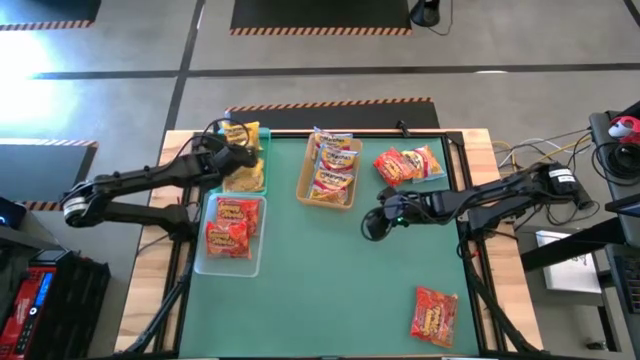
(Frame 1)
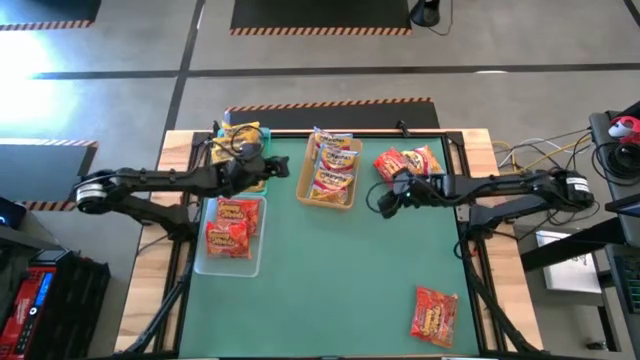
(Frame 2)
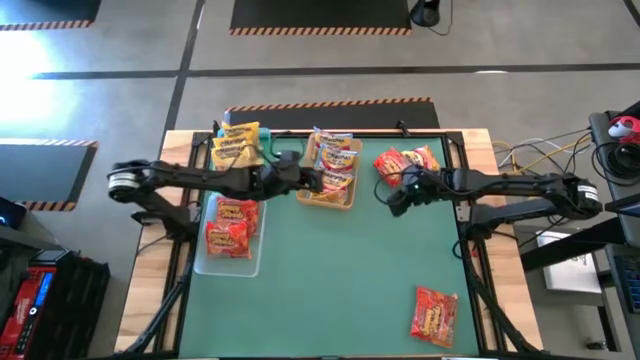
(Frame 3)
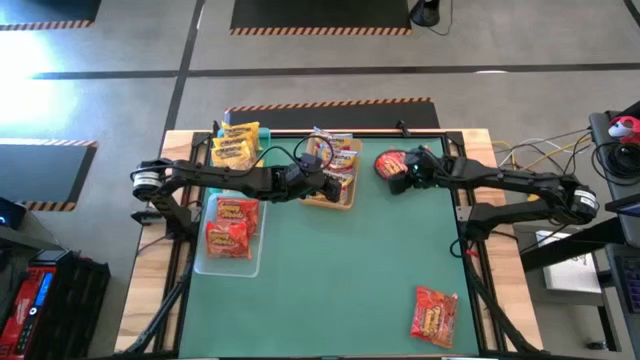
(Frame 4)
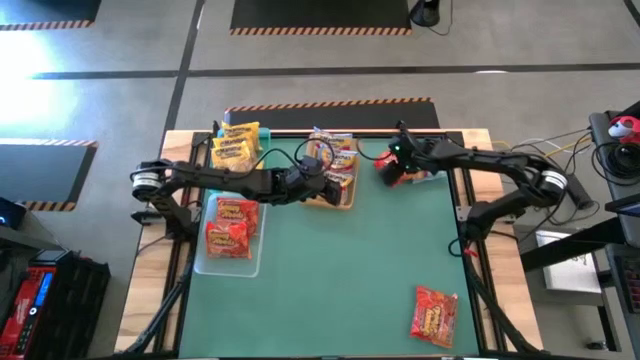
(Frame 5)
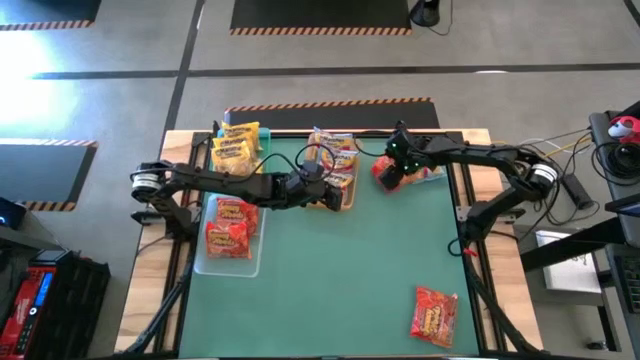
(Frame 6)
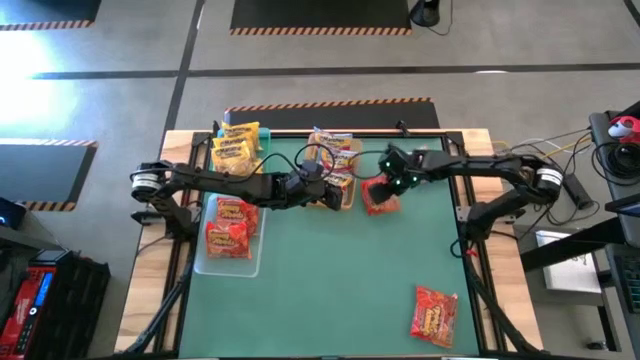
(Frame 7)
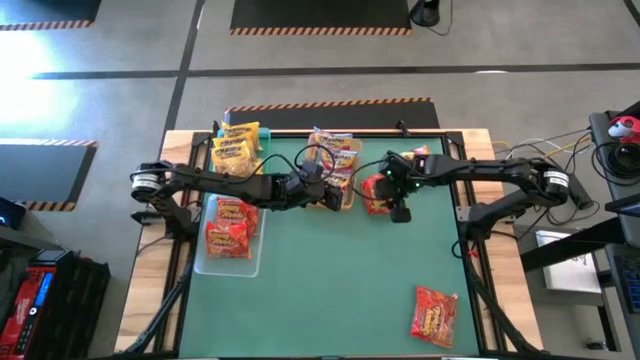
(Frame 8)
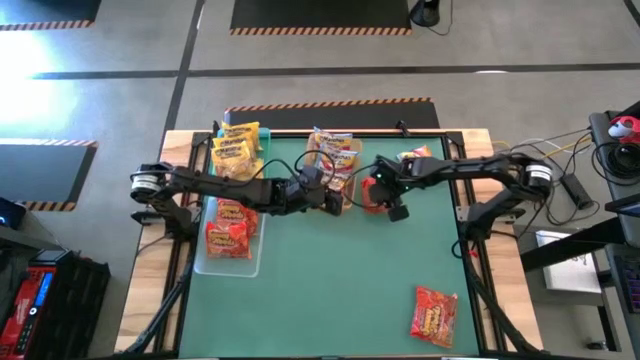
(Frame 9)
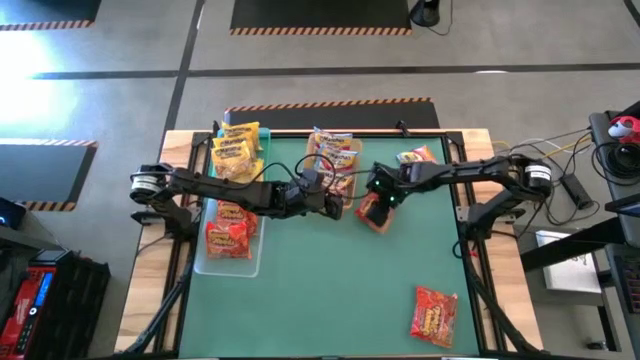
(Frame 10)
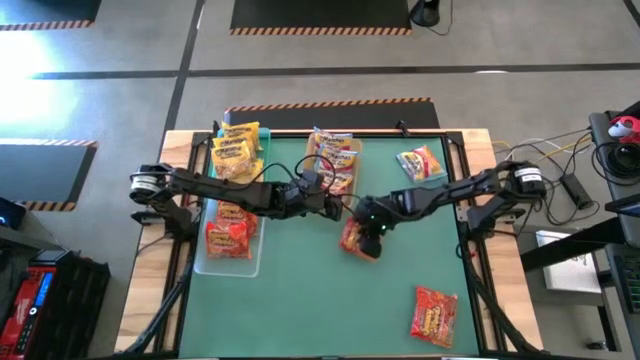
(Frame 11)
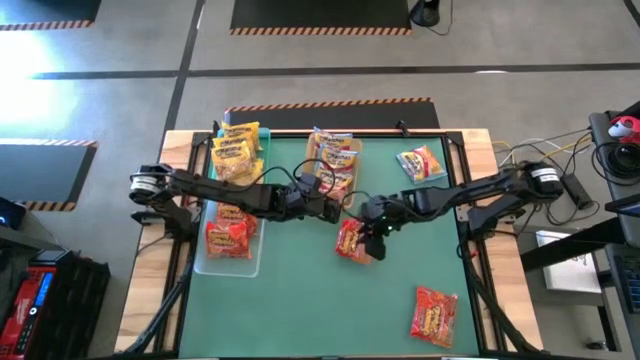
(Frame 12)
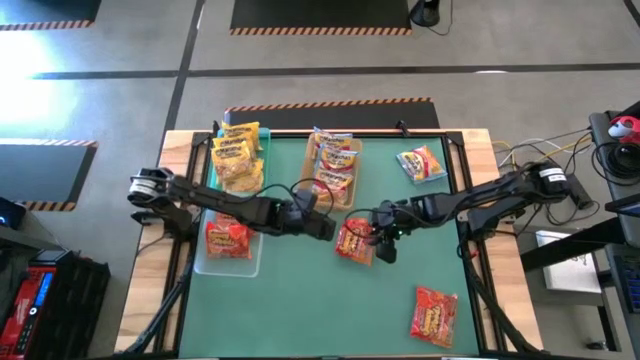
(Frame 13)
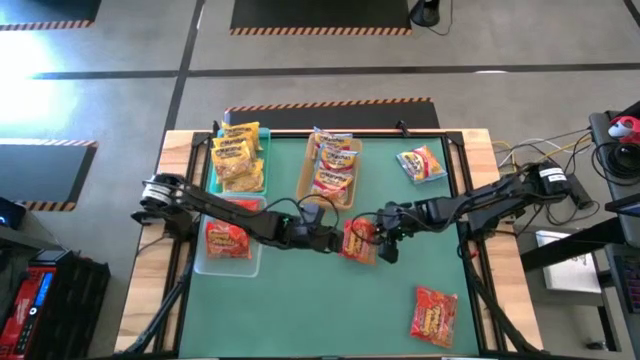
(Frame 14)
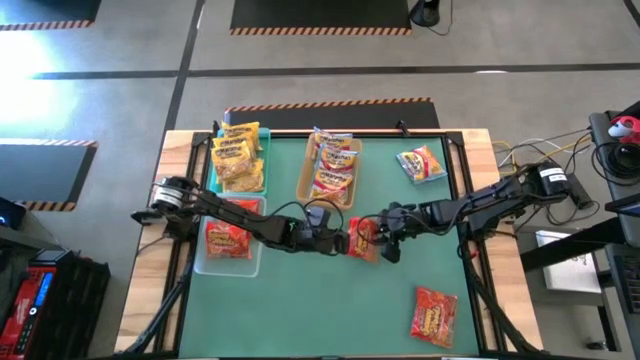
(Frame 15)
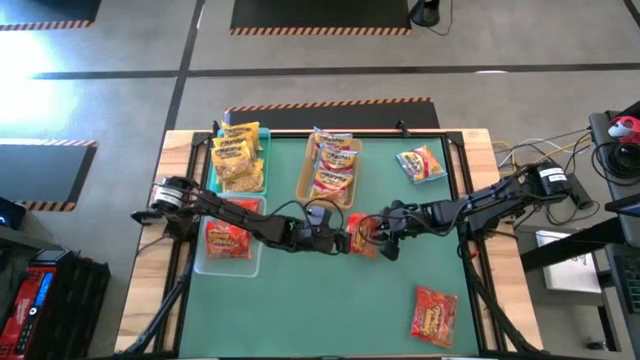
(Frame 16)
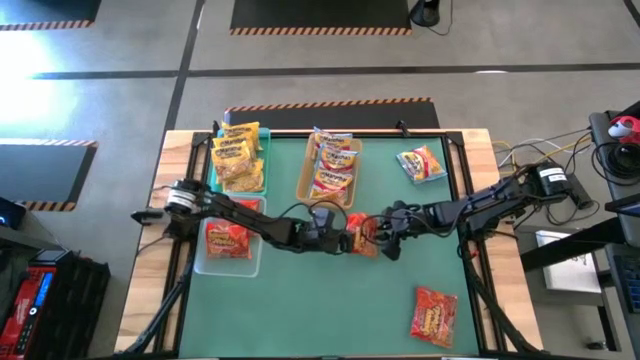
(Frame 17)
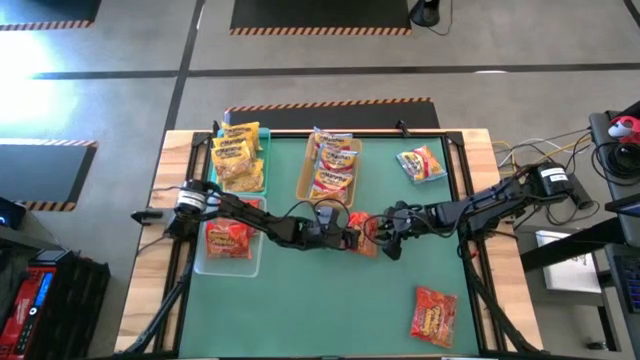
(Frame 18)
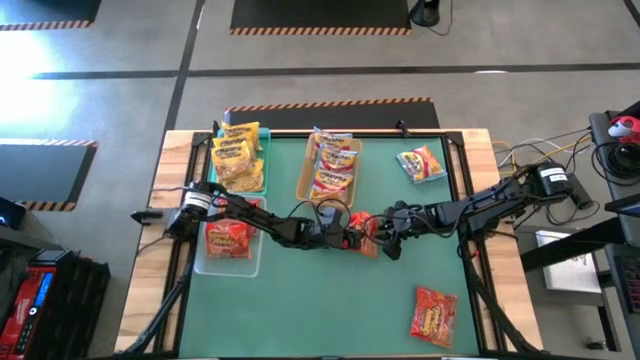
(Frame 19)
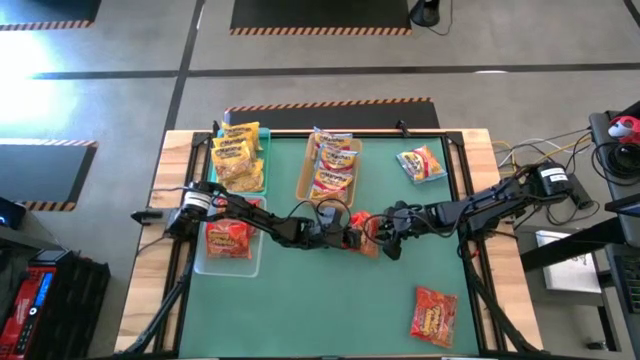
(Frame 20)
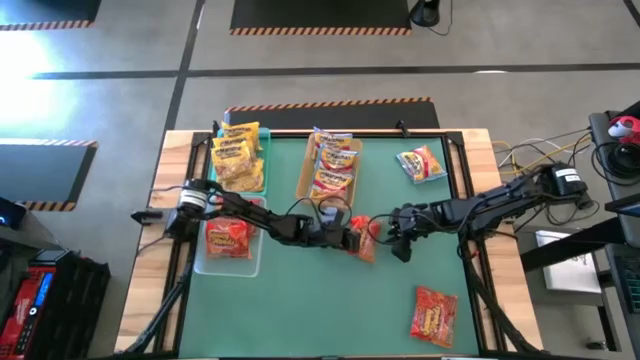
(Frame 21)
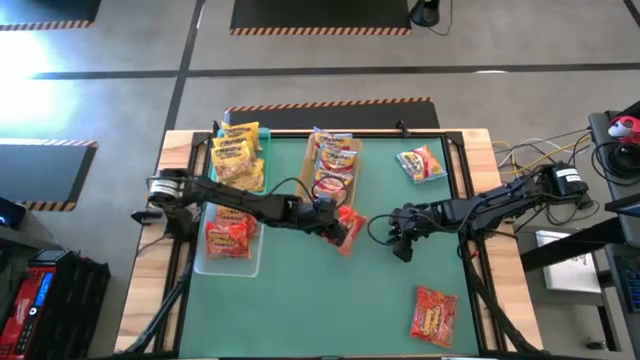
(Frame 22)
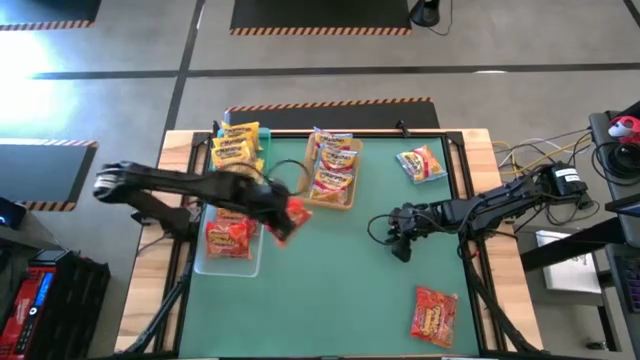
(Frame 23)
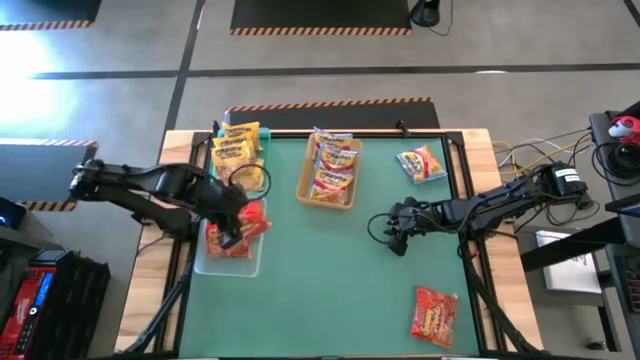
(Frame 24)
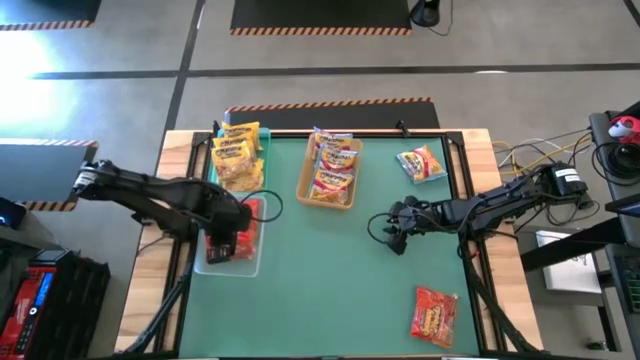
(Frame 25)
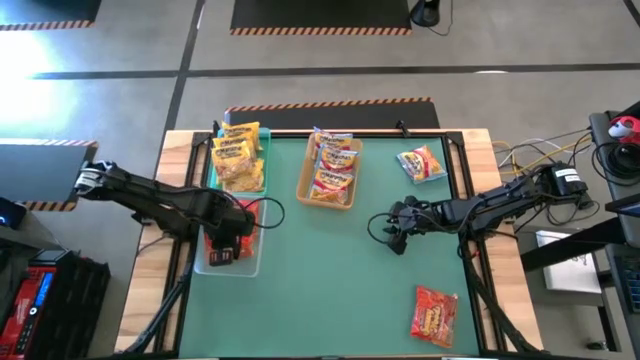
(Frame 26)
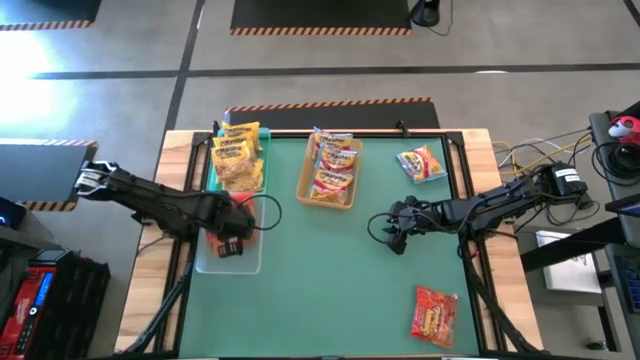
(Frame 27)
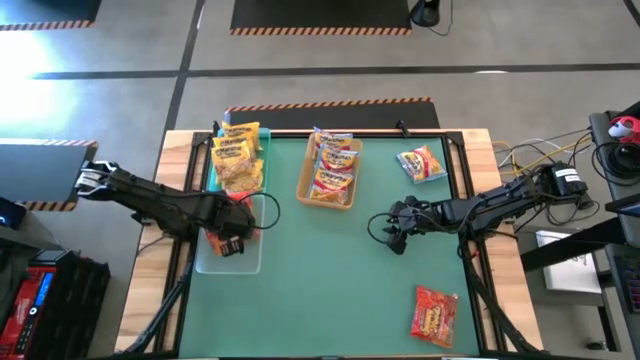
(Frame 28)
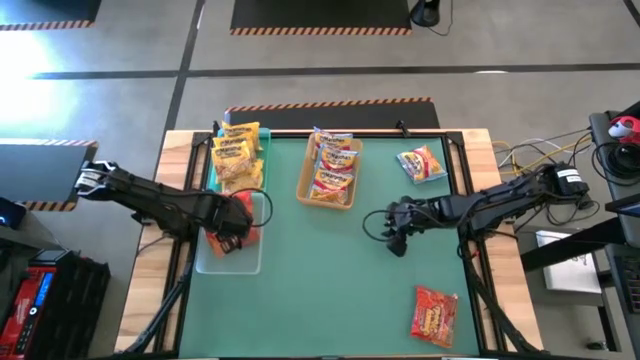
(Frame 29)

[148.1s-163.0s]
Task: Sort Maruchan noodles
Put the orange noodle pack into the white bin

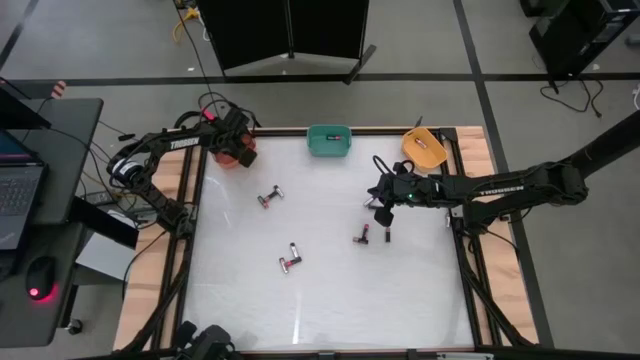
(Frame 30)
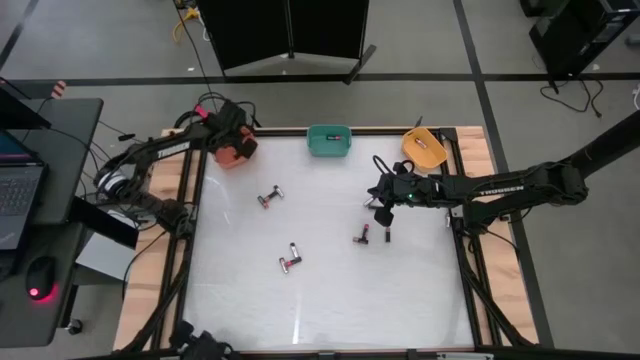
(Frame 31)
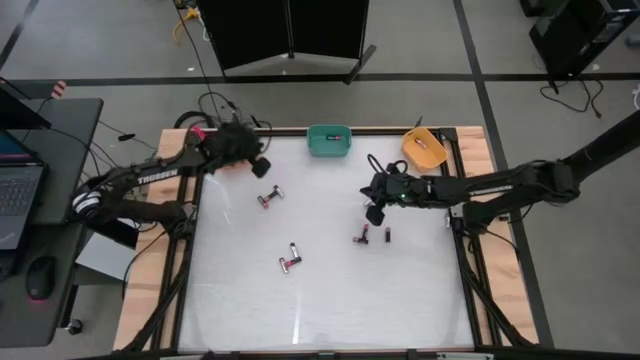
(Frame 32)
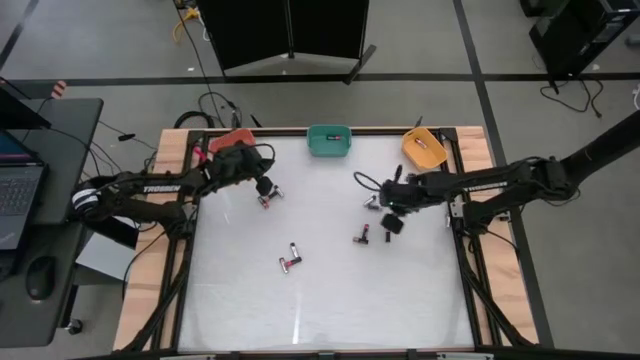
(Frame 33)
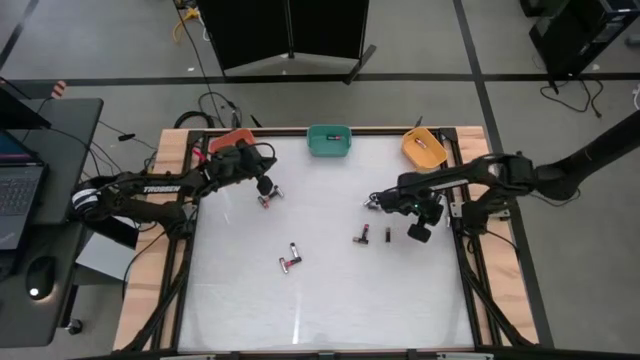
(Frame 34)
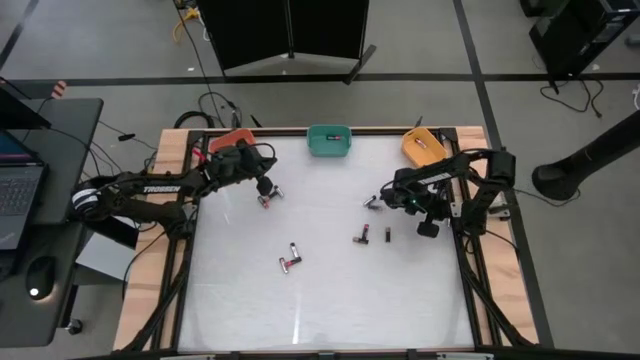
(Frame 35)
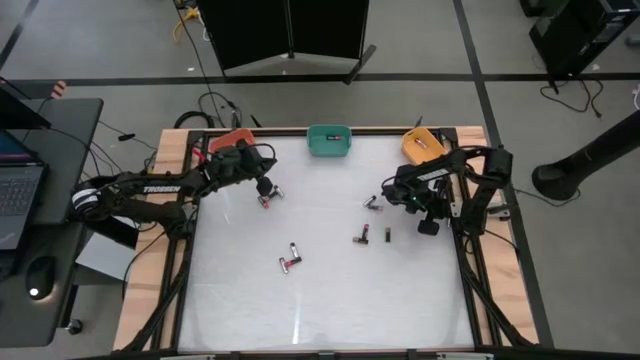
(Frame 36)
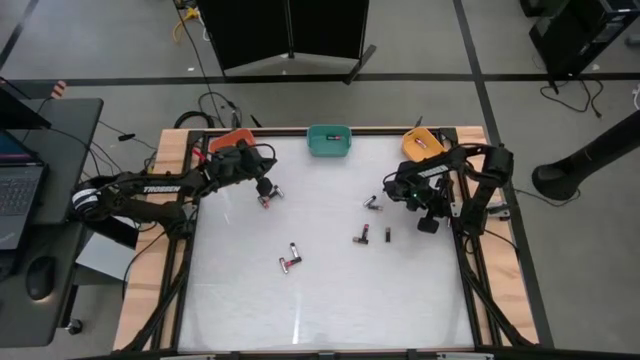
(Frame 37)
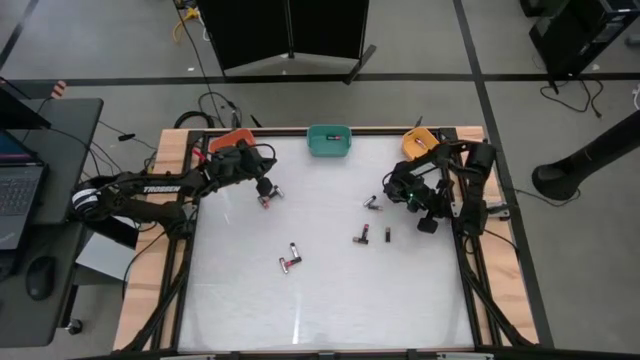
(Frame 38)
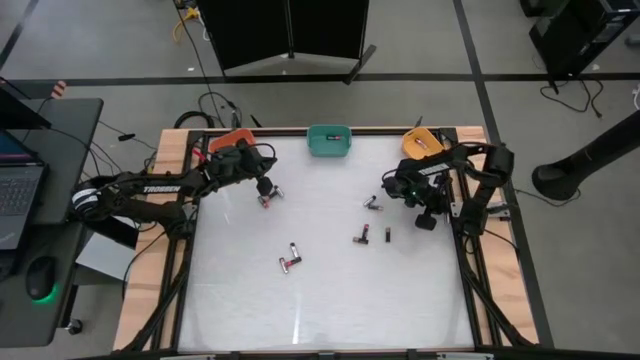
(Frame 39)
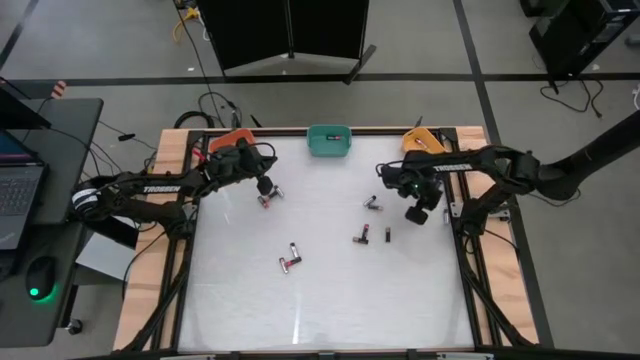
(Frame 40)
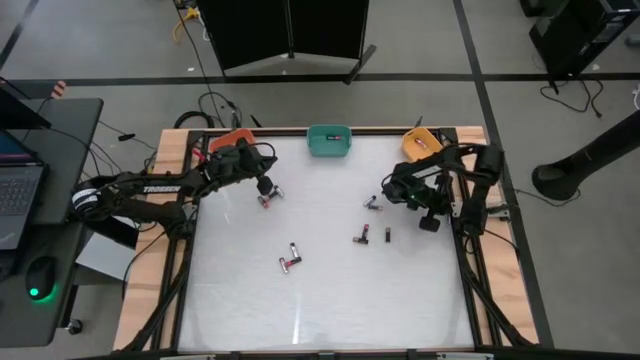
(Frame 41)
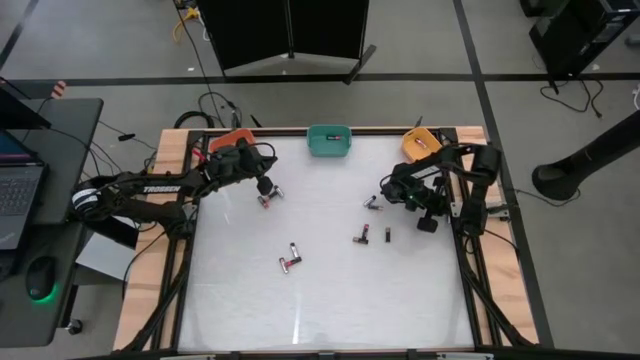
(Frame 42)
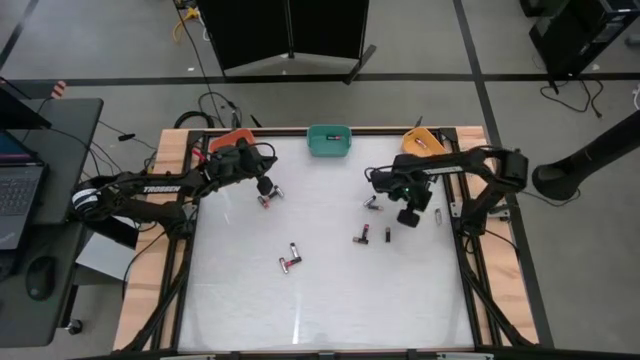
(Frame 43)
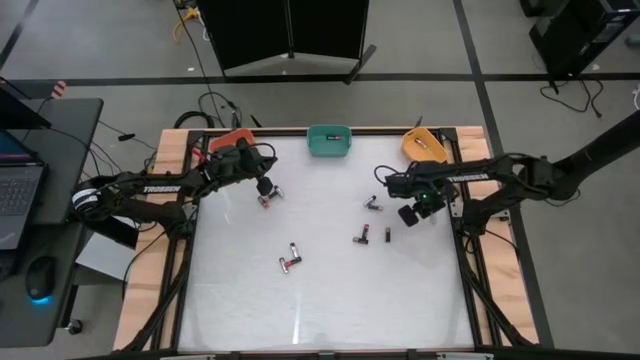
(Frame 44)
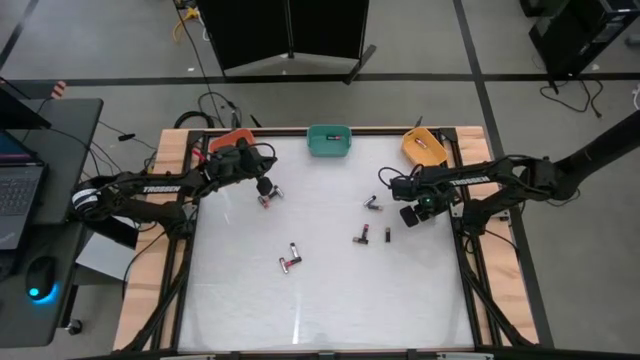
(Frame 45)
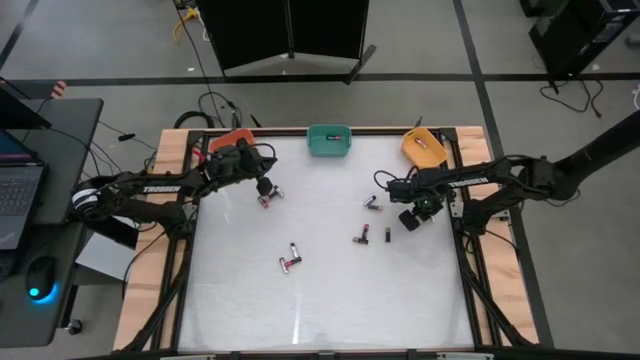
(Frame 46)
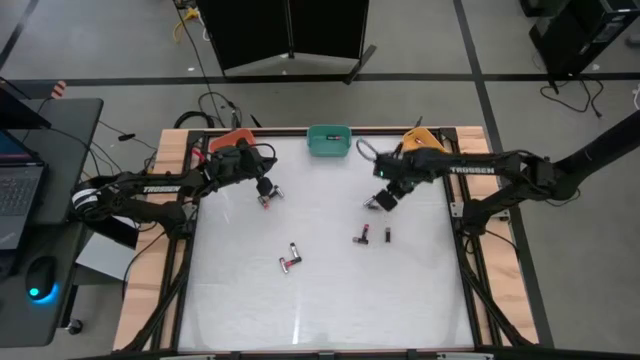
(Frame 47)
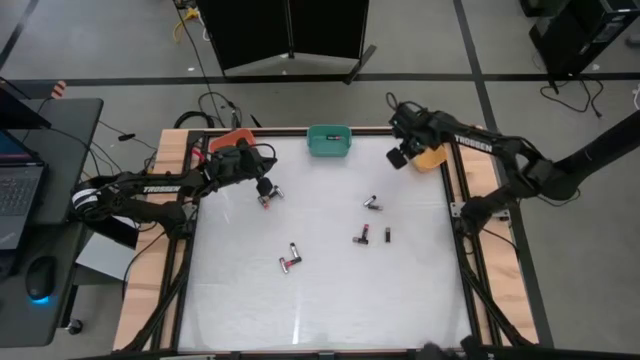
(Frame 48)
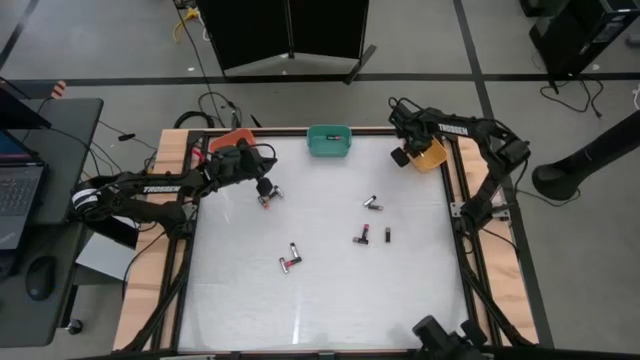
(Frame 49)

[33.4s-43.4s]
Task: Sort batteries
Put the silver battery into the yellow bin
